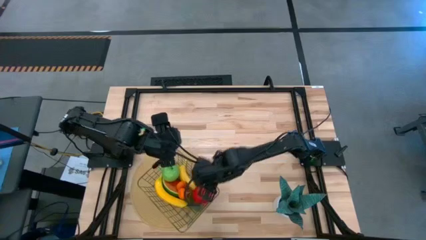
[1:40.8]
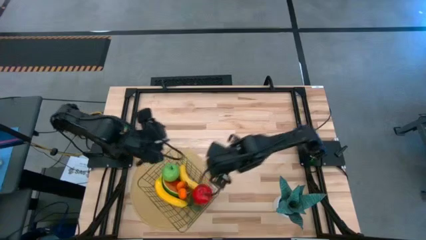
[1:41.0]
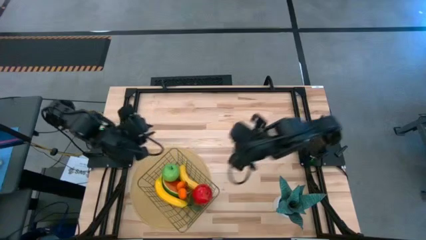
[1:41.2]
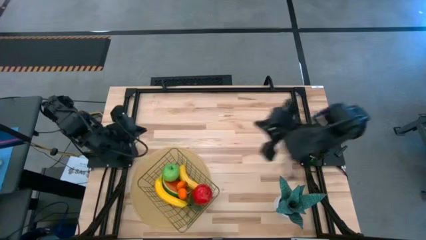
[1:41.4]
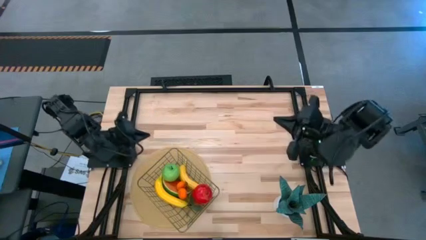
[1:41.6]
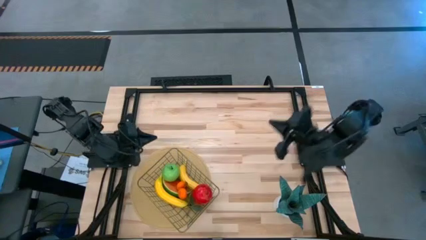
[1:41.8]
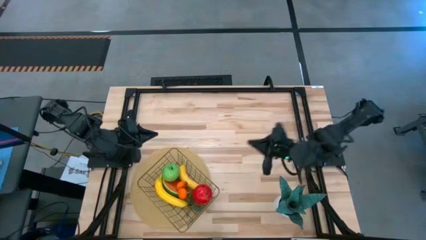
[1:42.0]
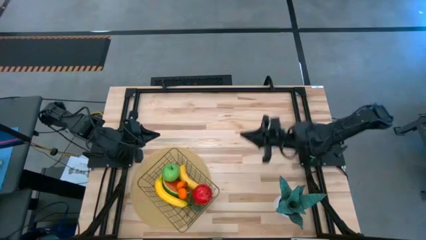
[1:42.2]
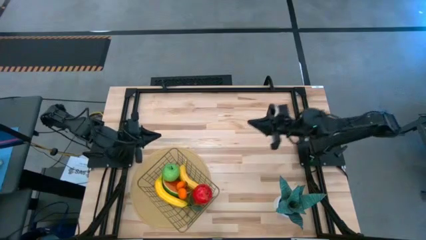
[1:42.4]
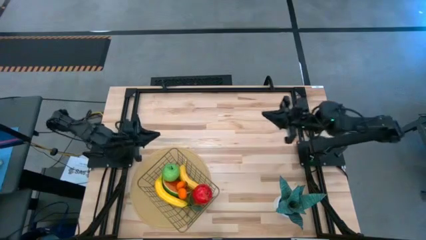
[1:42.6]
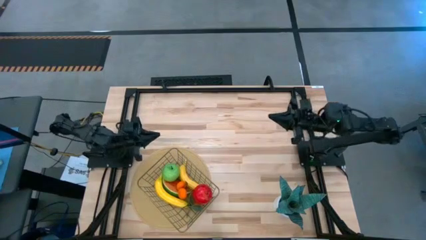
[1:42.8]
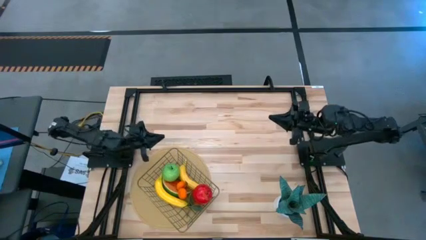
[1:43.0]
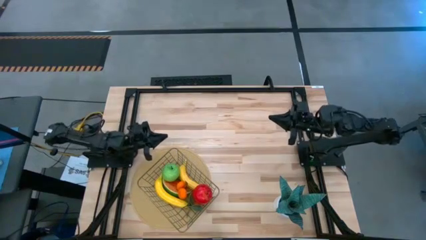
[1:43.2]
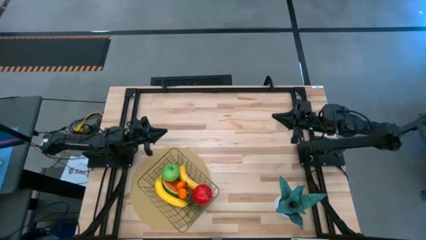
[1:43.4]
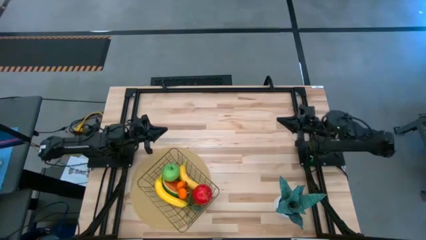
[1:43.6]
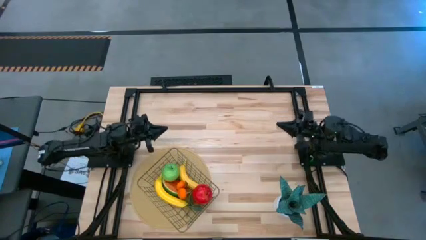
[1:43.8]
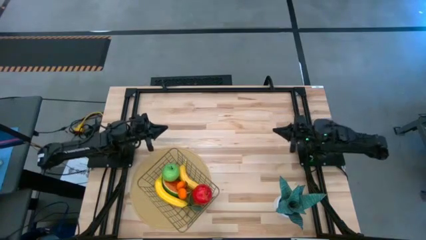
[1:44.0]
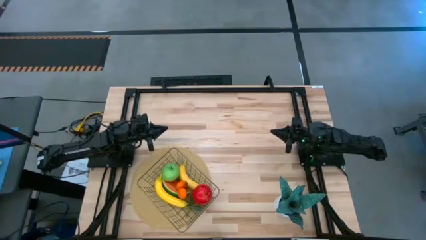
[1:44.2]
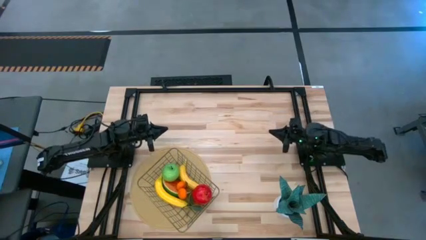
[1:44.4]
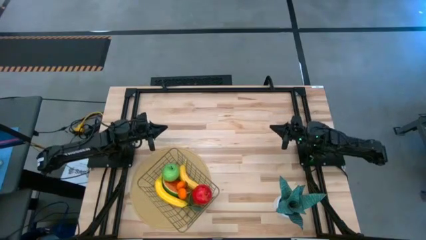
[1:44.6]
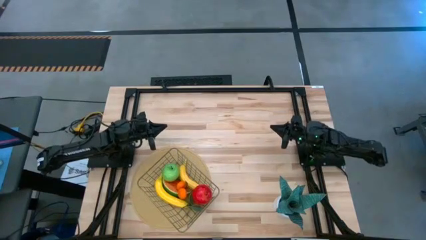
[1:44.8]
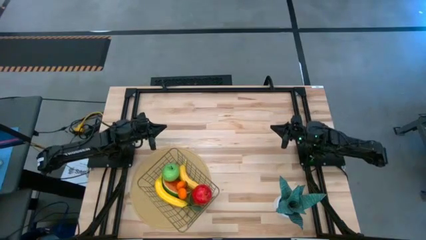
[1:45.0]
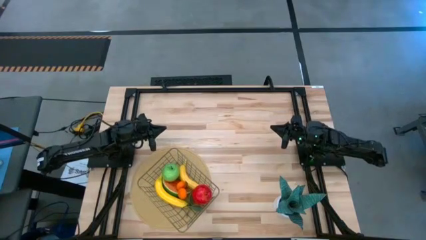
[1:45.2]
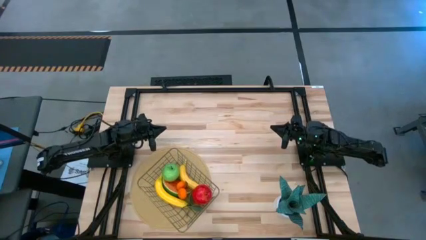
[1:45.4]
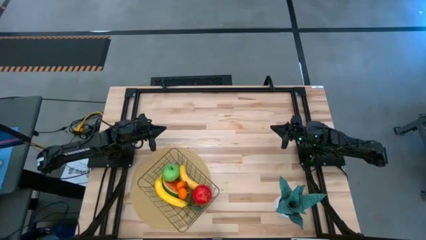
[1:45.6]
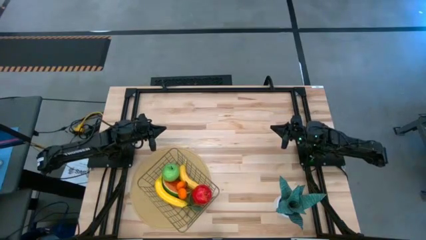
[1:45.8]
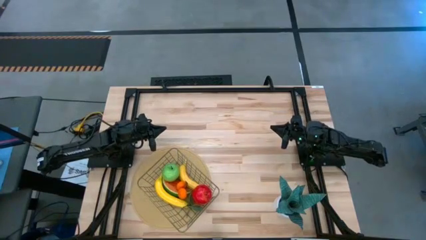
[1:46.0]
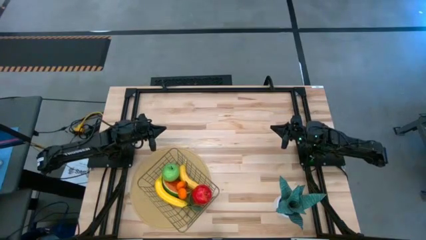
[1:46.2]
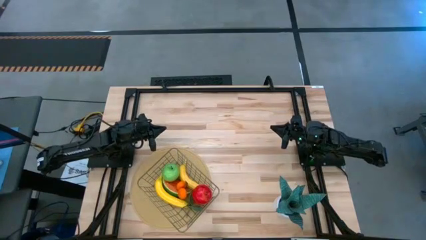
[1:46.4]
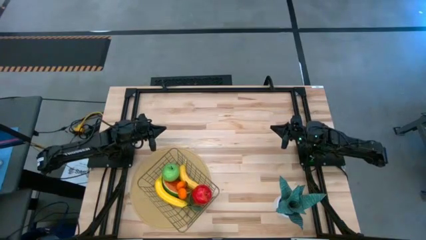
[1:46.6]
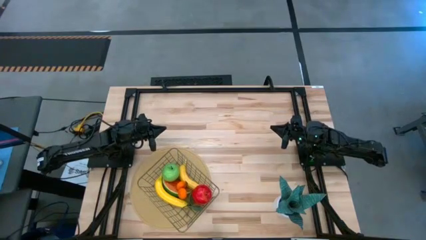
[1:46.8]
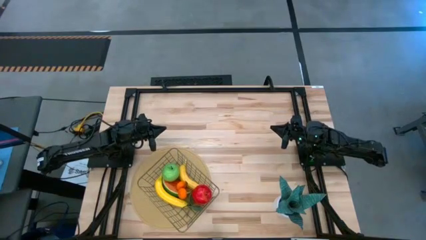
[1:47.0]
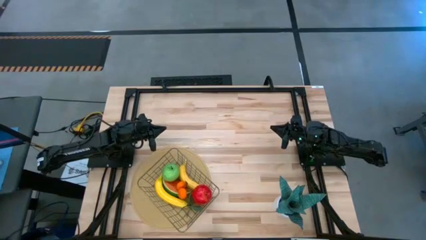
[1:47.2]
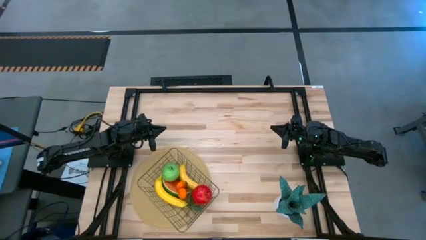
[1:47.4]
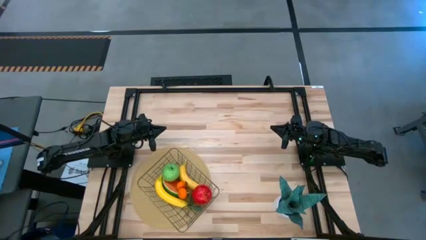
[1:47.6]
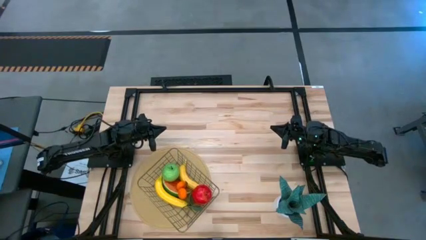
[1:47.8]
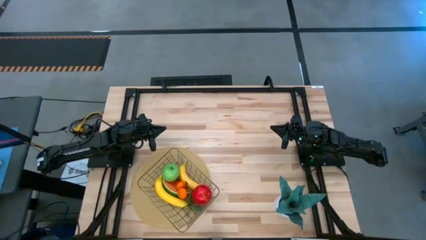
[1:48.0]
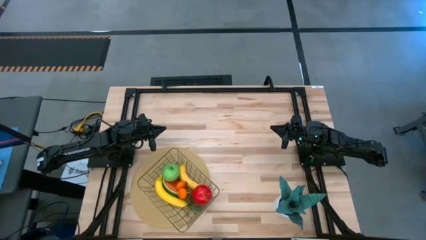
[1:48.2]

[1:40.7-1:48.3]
Task: Build produce basket
Return to Home Position

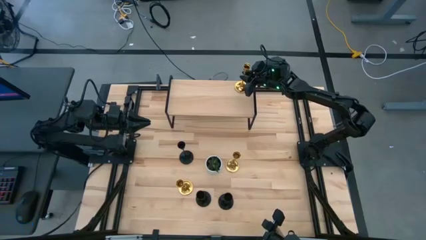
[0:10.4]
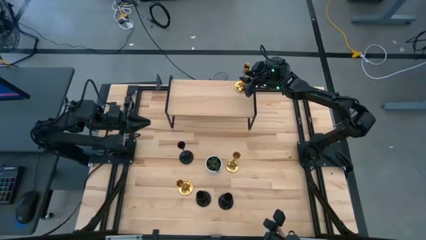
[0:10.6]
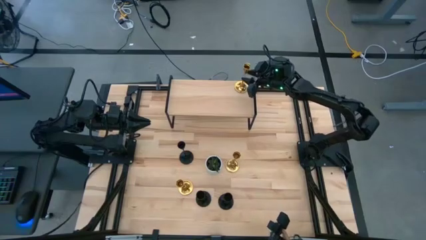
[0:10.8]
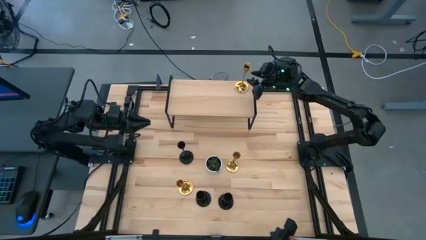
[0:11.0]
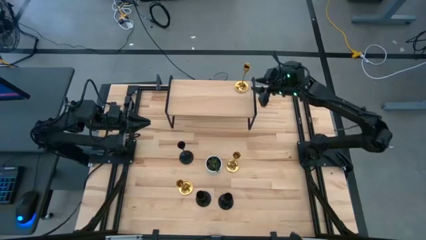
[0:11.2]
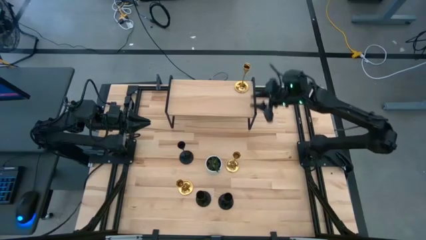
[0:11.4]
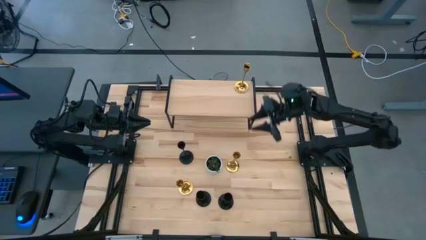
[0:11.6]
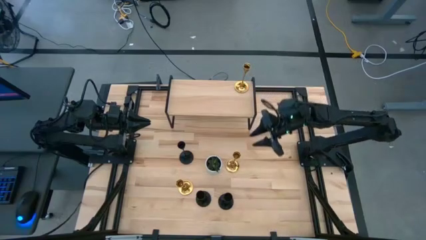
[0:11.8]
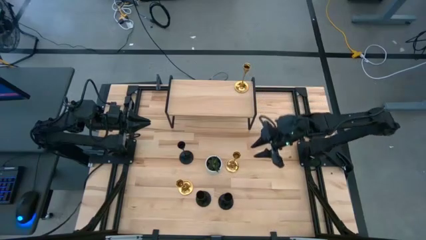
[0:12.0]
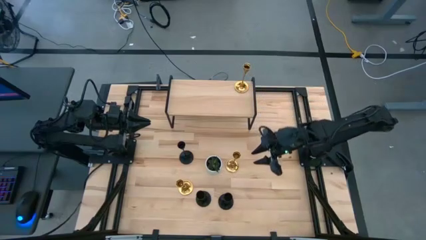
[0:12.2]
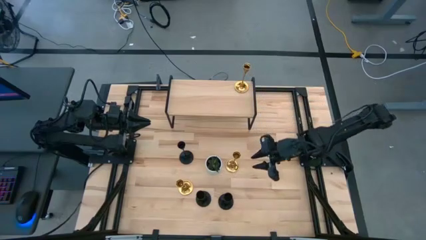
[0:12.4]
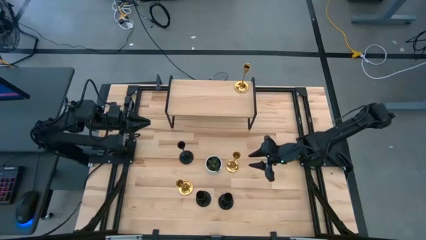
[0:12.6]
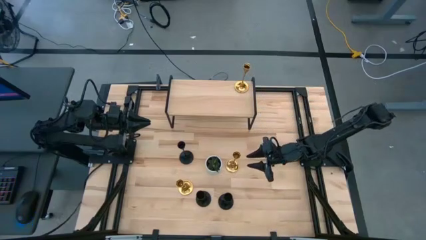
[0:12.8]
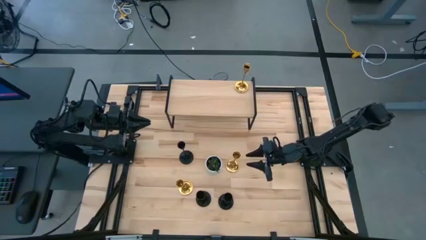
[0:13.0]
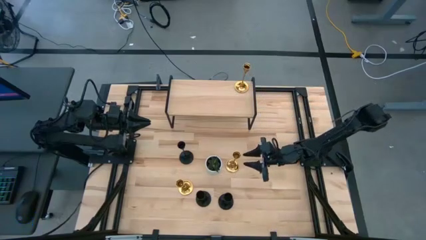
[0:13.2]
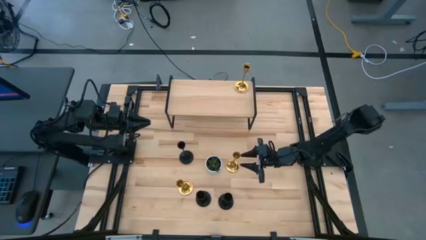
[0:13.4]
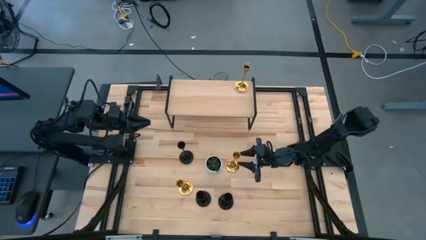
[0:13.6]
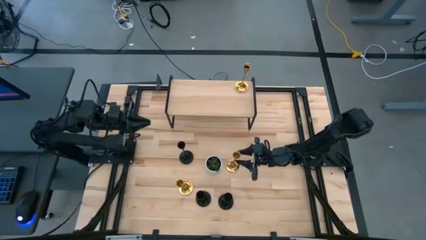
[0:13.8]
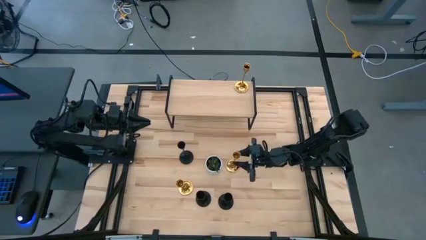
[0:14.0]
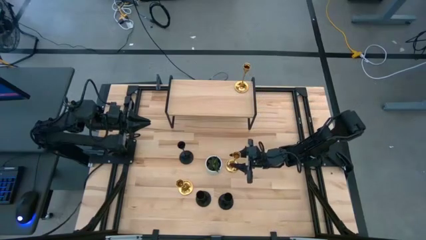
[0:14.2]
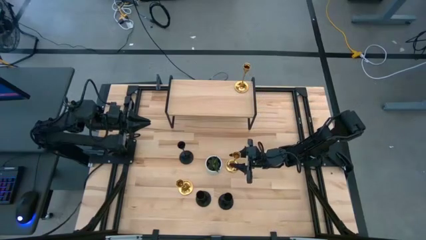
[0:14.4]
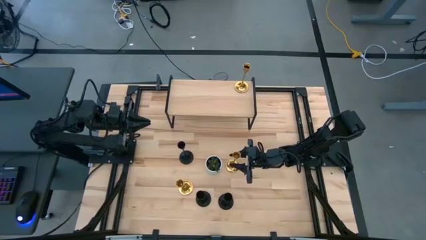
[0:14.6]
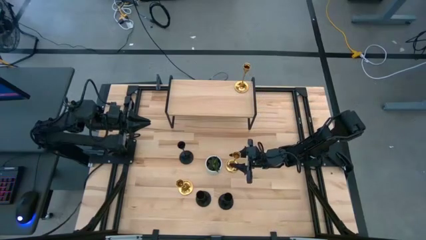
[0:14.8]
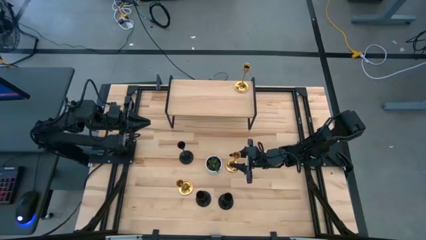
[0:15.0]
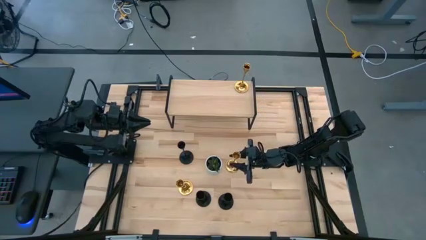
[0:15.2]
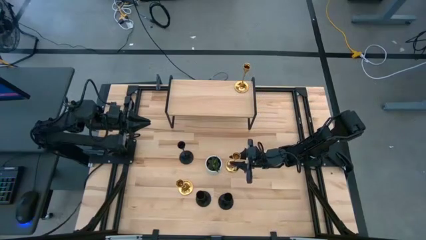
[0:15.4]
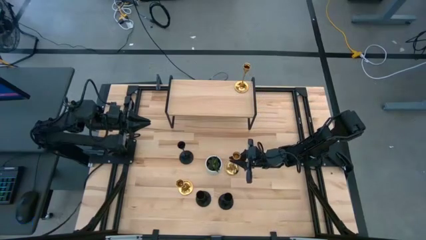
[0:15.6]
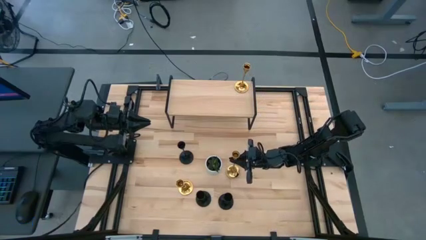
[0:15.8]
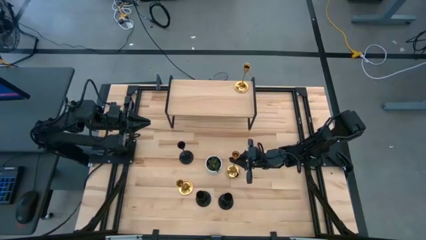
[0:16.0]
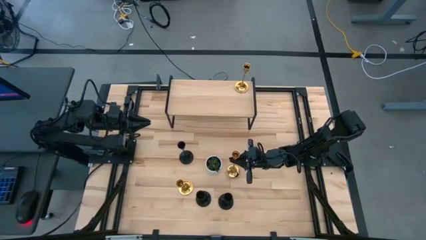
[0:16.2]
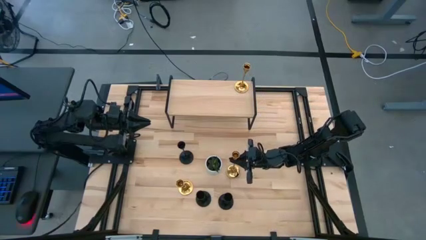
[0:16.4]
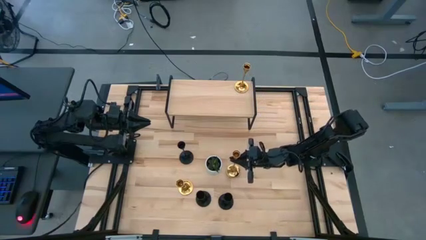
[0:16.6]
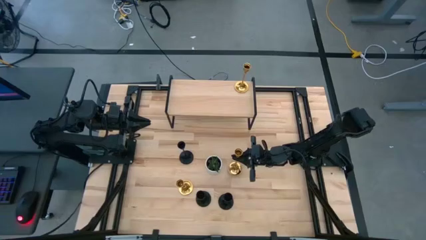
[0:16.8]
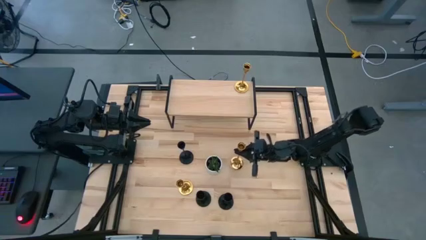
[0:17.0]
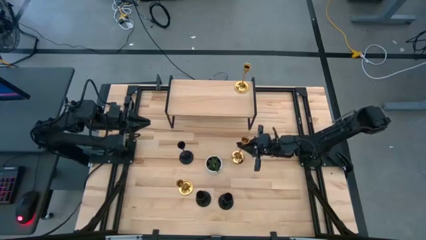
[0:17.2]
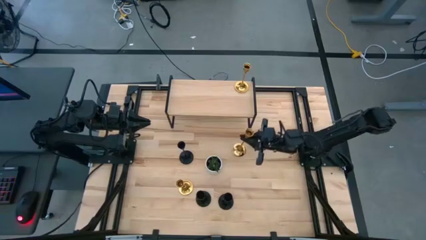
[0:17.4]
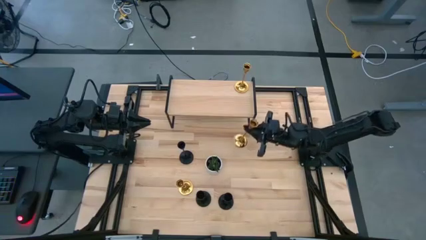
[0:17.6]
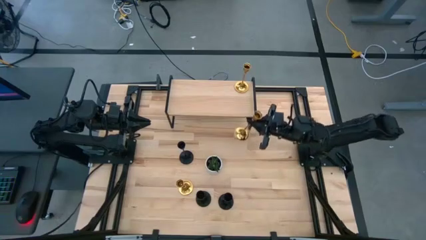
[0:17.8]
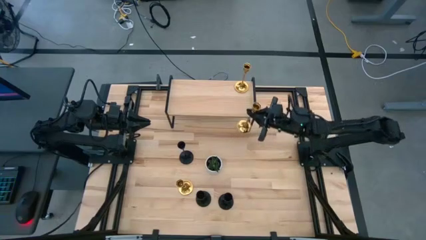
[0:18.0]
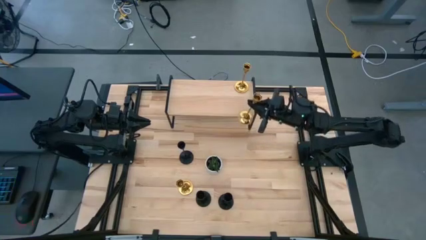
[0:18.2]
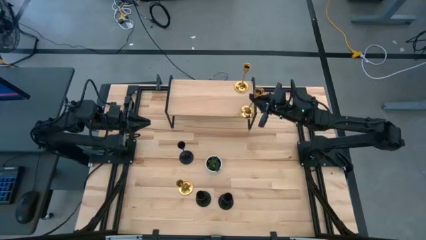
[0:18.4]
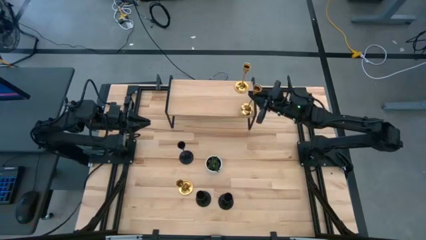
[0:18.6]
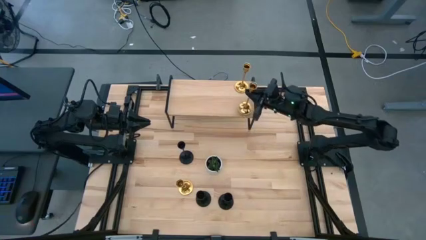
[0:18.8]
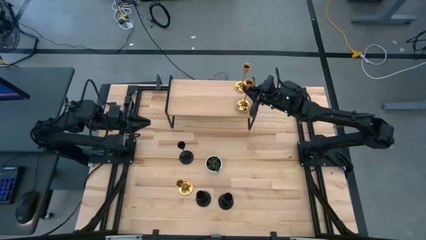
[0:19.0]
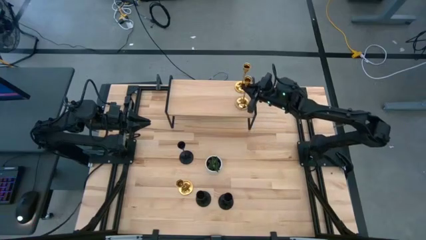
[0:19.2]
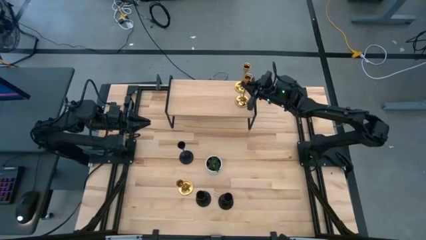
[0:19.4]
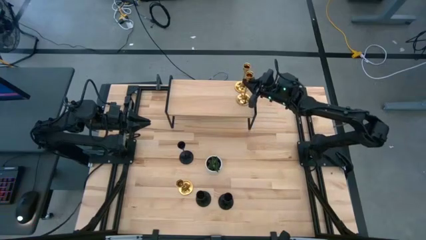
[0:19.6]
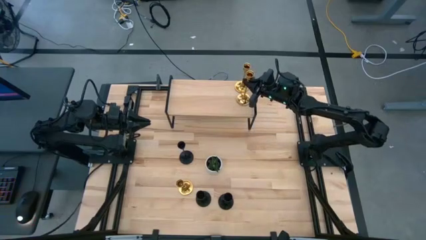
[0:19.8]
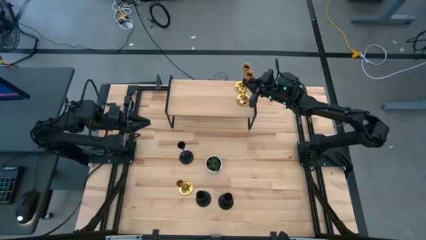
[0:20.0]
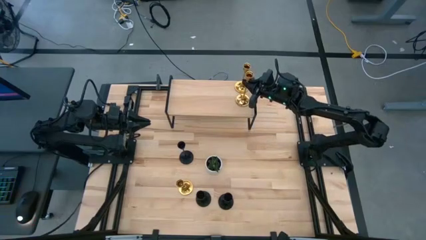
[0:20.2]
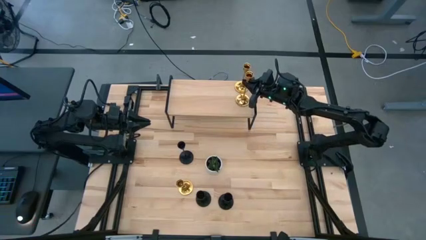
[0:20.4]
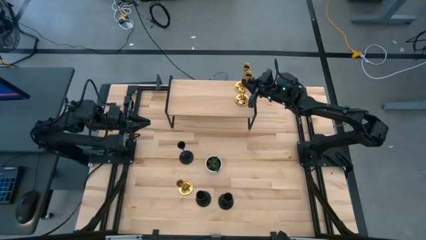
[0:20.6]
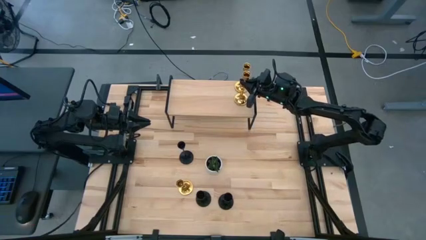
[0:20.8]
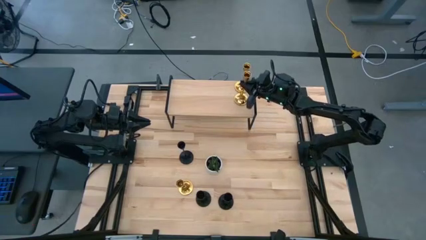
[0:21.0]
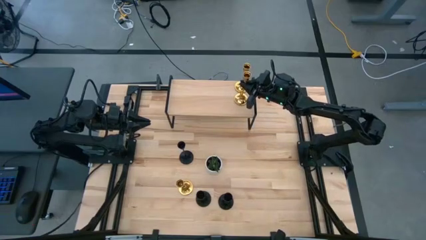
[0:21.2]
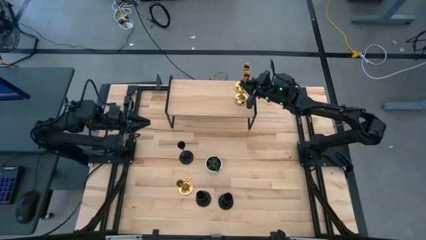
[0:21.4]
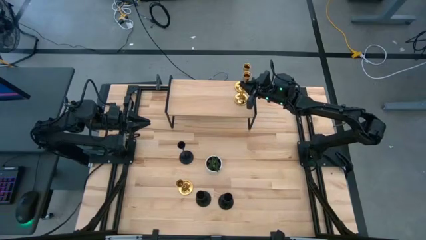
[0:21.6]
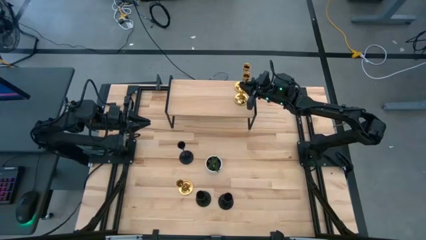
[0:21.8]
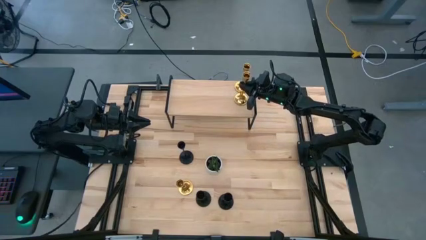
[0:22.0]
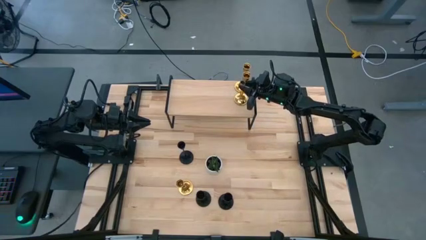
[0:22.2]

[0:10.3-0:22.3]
Task: Pick & Place candle stick holders
Put the right golden candle holder on the shelf aligned with the other golden candle holder
